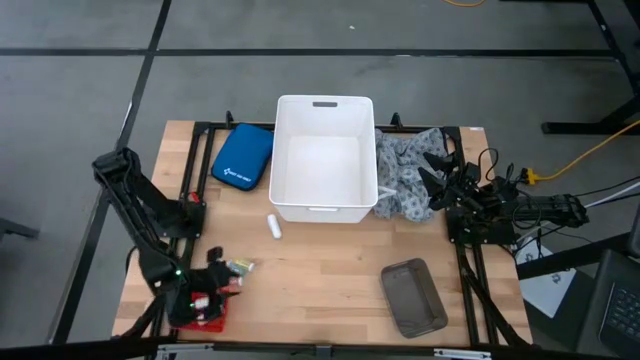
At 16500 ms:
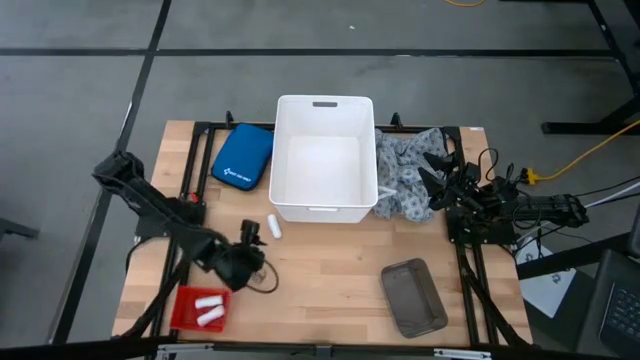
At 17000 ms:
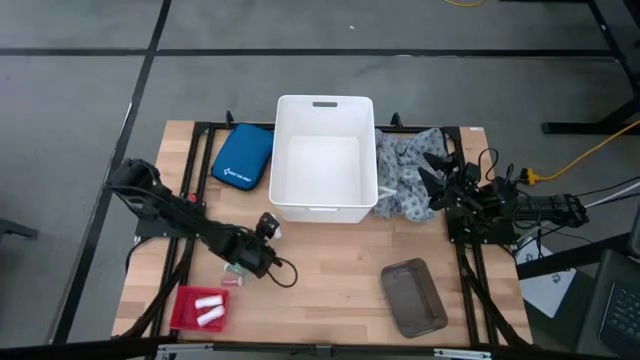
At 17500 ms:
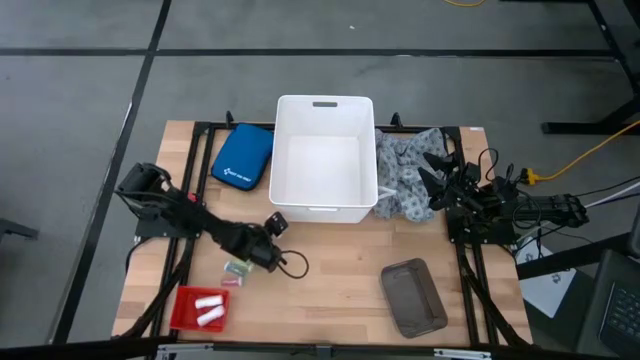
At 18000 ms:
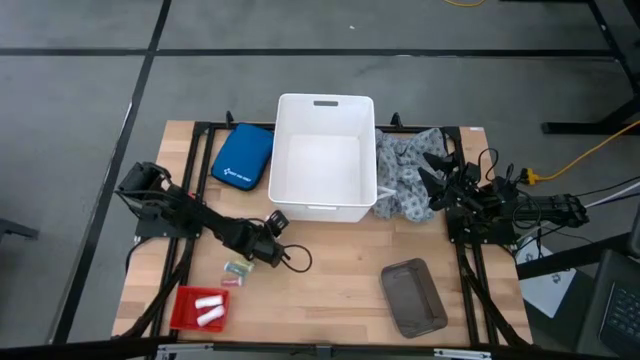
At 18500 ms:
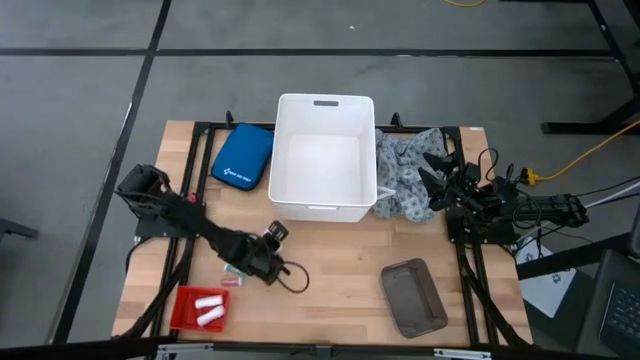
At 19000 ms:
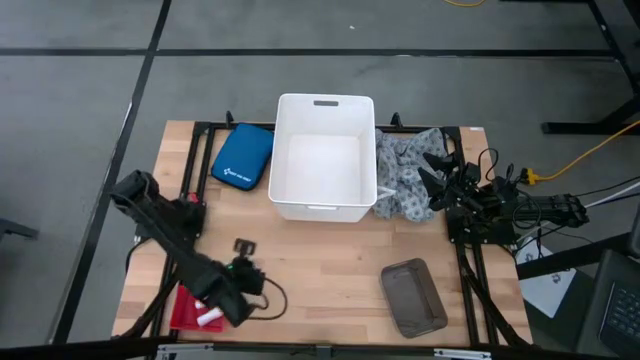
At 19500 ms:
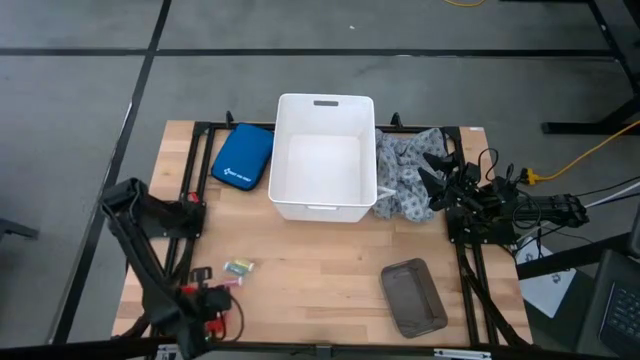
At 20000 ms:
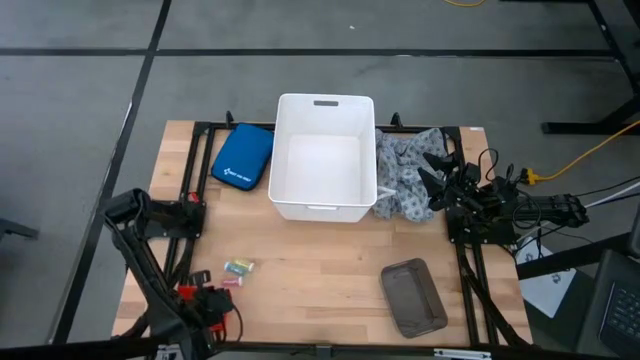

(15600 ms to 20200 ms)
Task: Pick & place medical supplies in basket/bin
Put the white rolled gauze into the red bin

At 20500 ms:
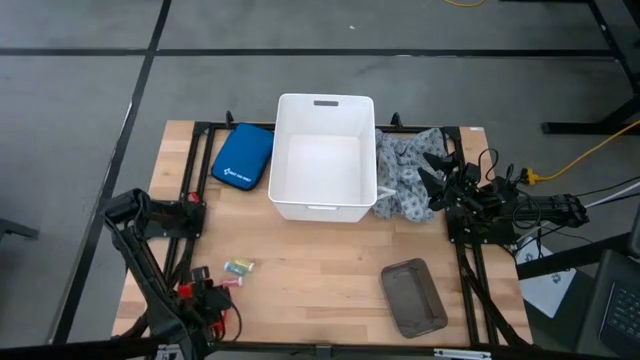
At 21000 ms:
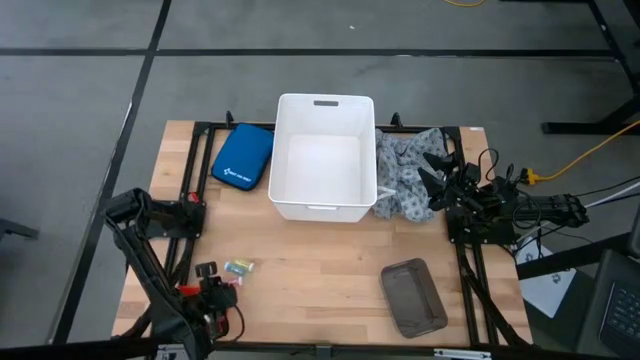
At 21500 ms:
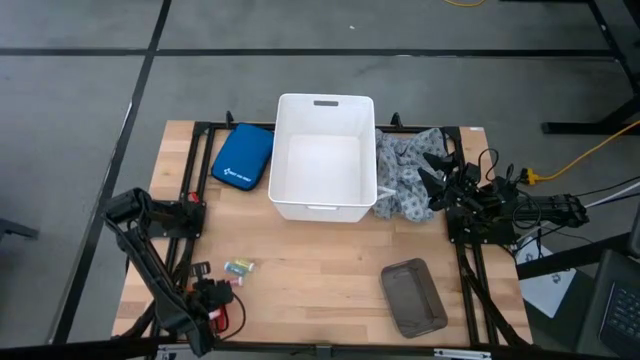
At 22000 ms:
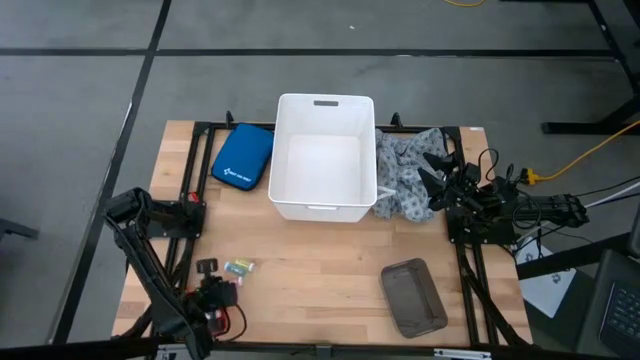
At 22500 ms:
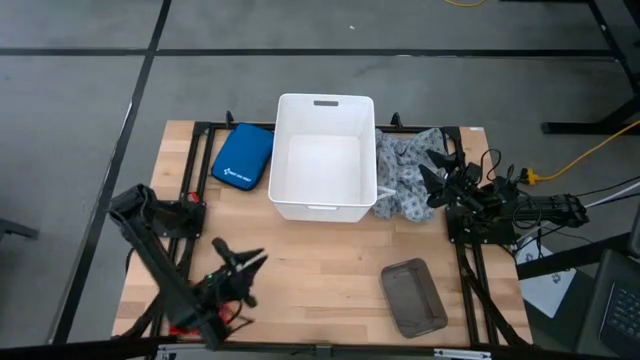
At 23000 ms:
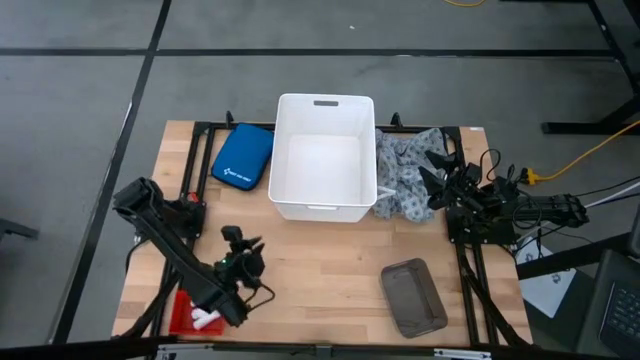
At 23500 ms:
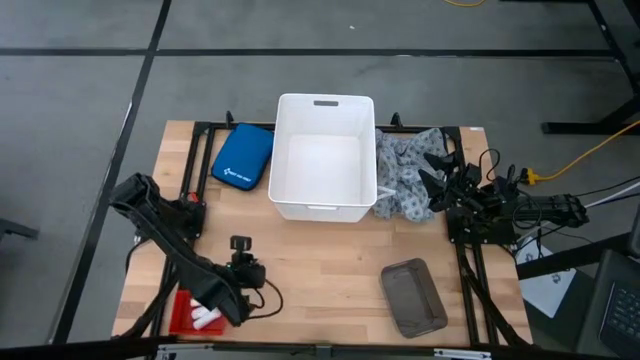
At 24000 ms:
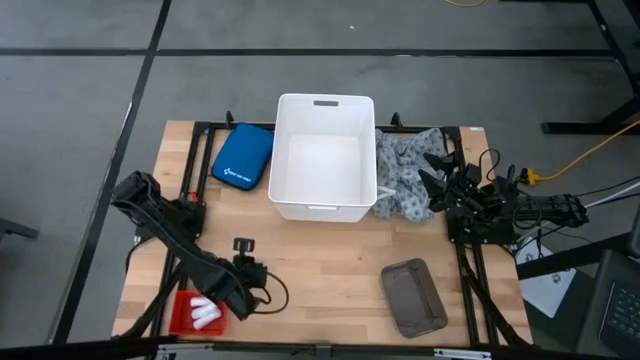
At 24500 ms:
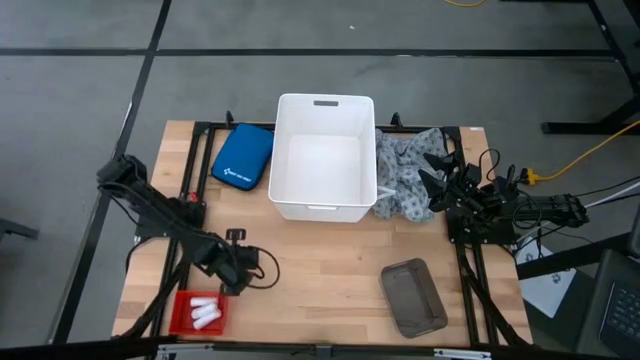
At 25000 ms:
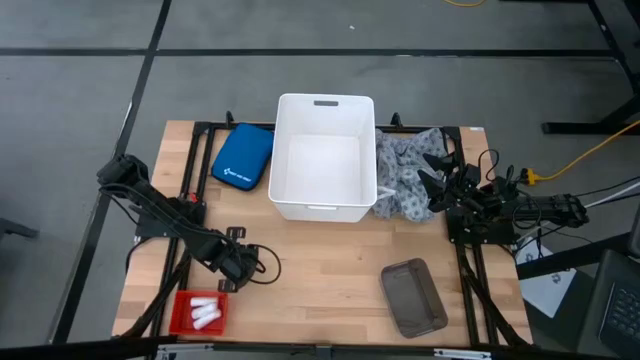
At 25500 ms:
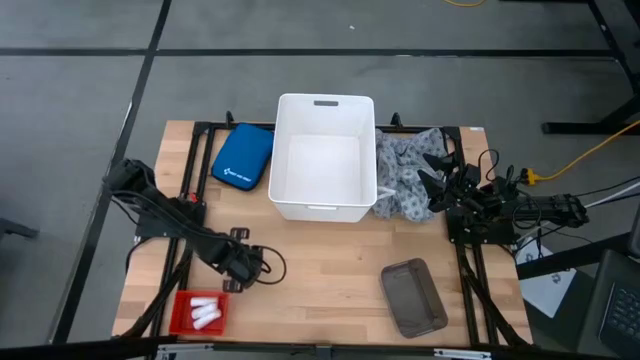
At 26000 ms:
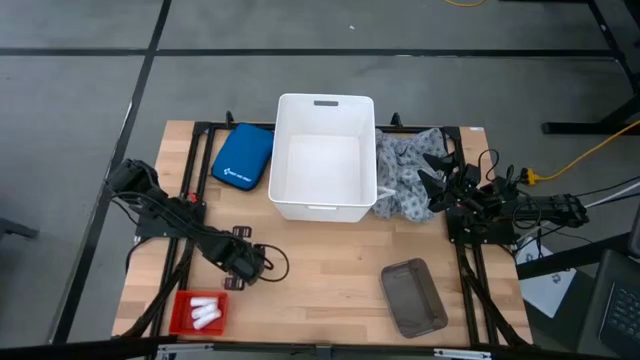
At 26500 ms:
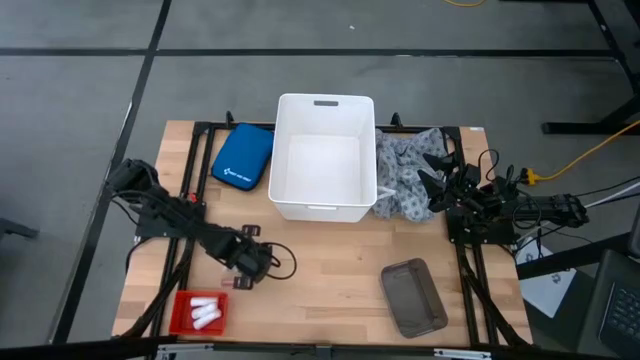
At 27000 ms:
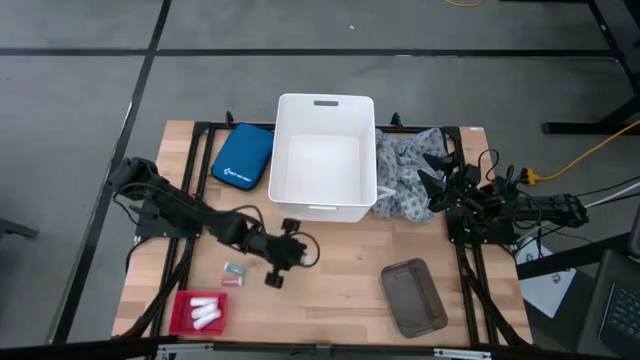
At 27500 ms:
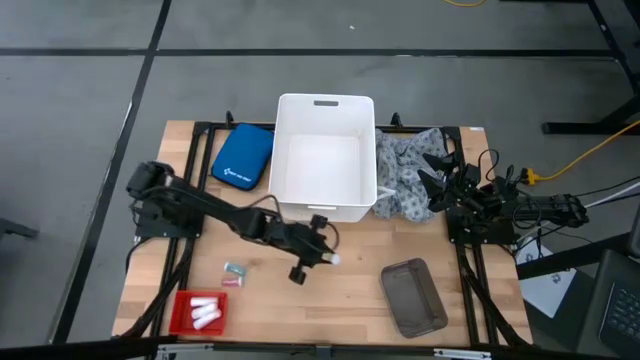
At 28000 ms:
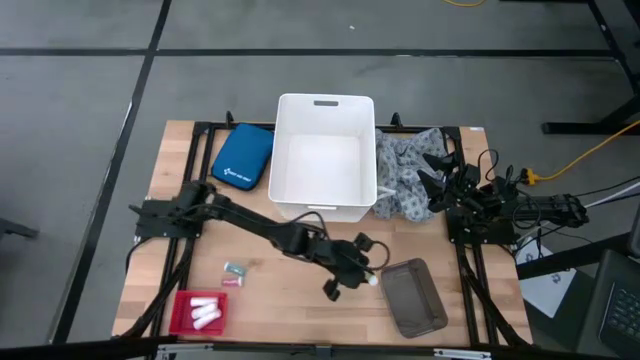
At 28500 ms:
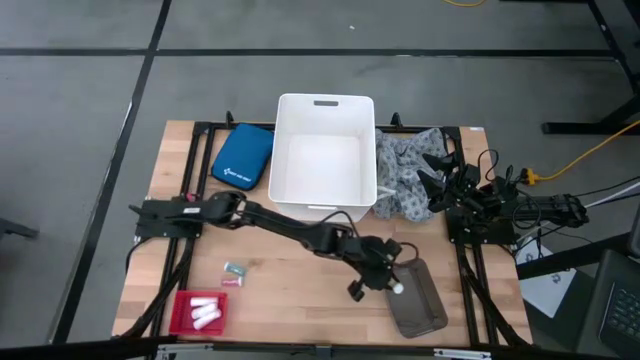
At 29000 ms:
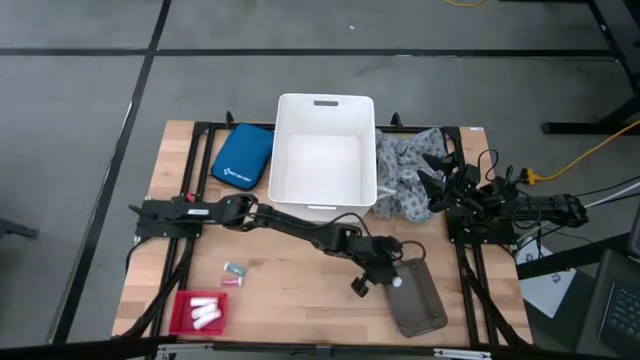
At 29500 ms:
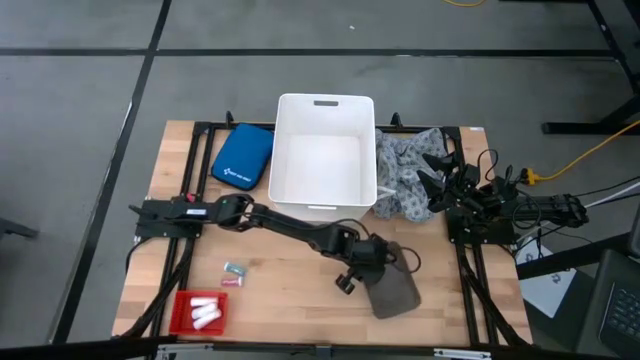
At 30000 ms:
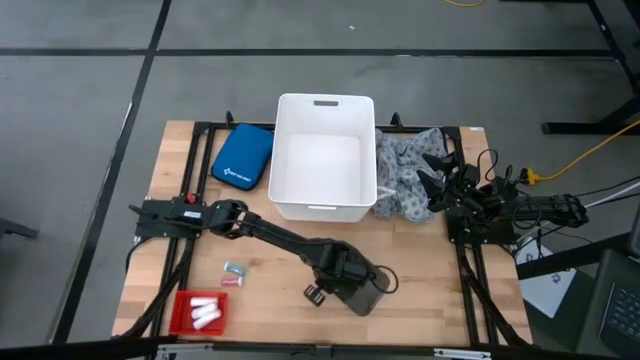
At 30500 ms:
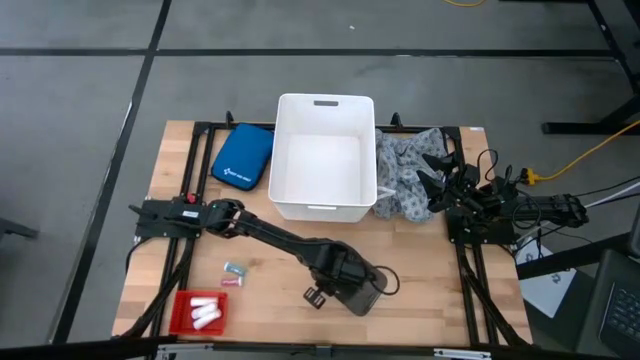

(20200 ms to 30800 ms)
Put the yellow pill bottle into the black bin

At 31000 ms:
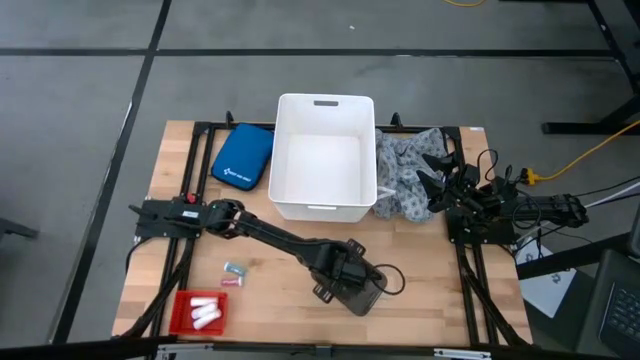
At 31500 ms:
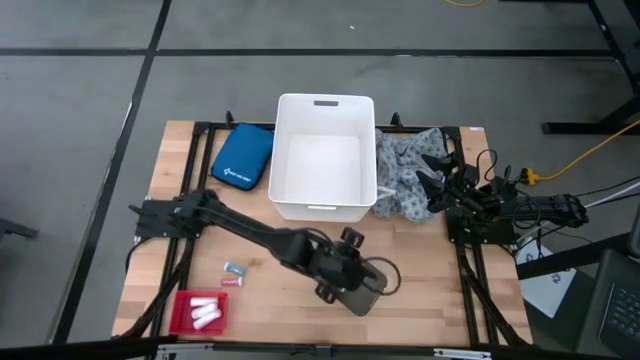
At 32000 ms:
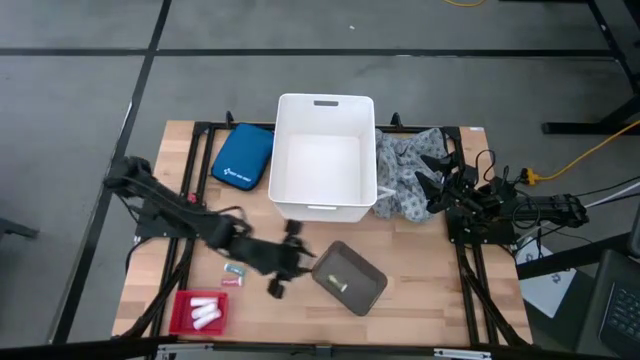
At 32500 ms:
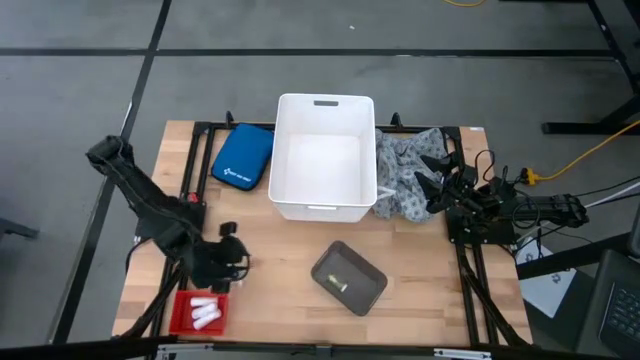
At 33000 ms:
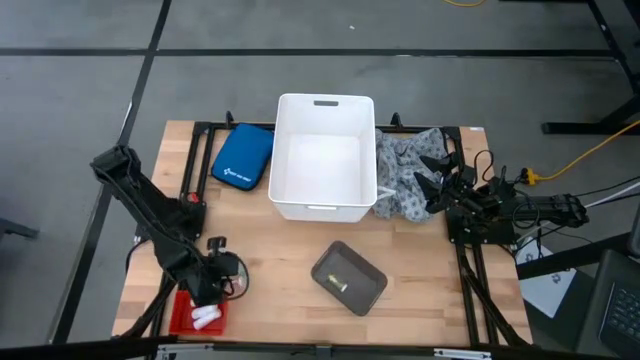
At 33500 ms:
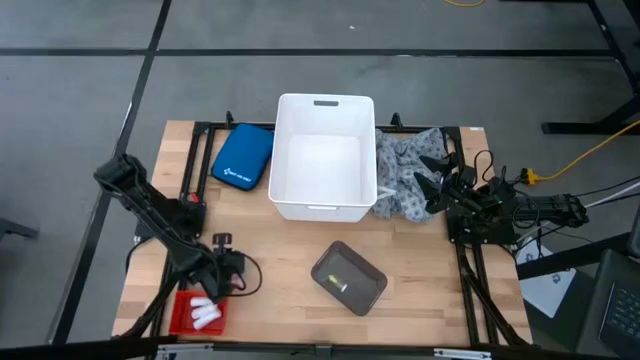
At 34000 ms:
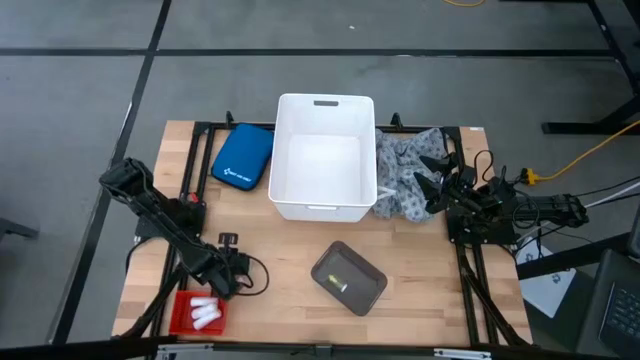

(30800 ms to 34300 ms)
Put the blue pill bottle into the black bin

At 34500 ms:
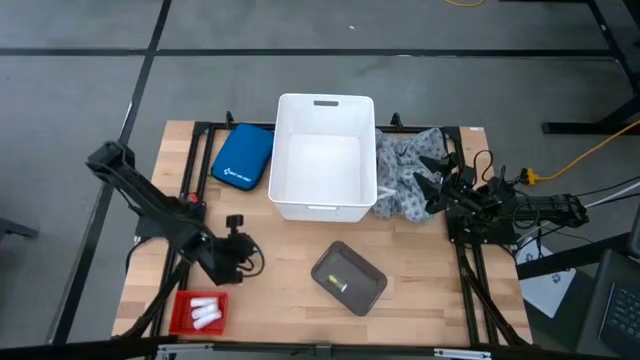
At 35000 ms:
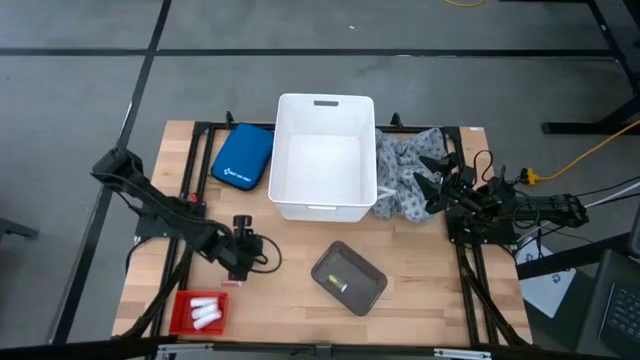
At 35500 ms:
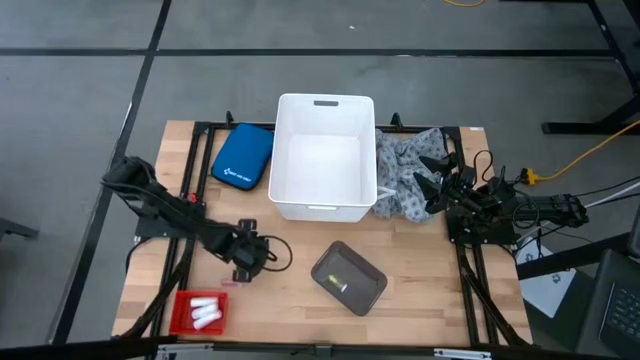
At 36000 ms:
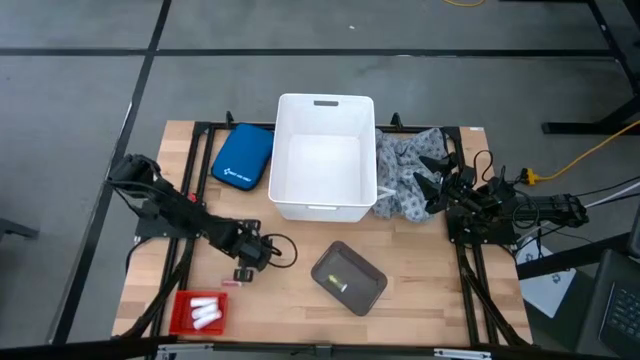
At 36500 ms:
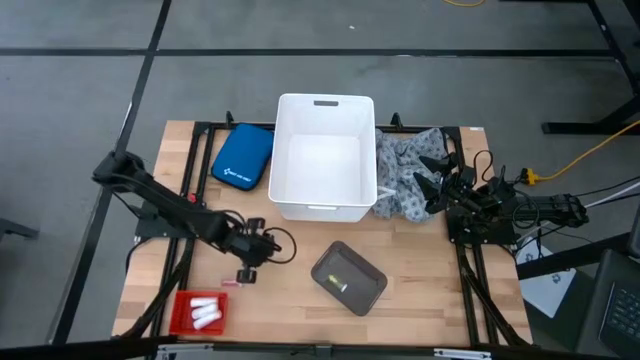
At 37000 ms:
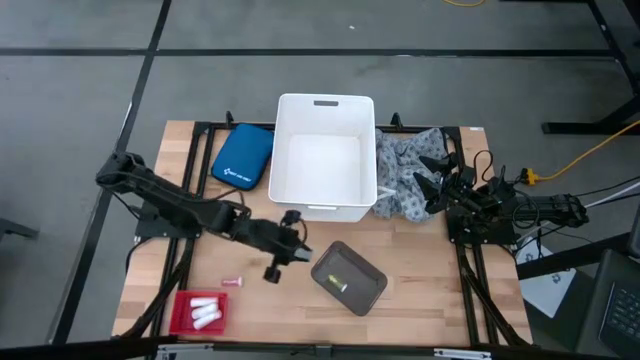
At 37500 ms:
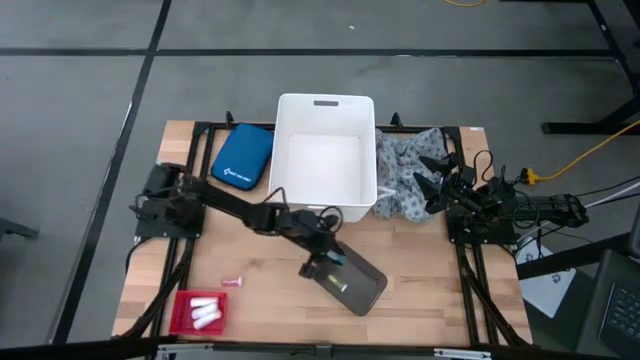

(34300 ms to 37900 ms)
Put the blue pill bottle into the black bin
